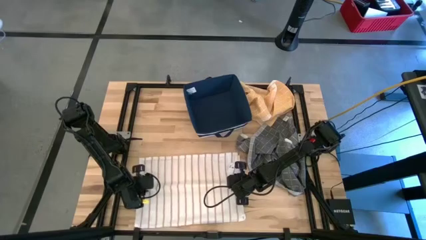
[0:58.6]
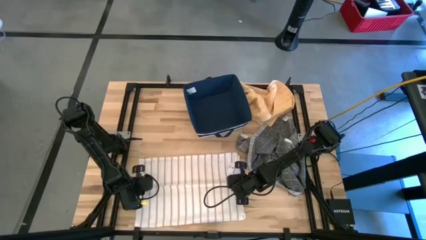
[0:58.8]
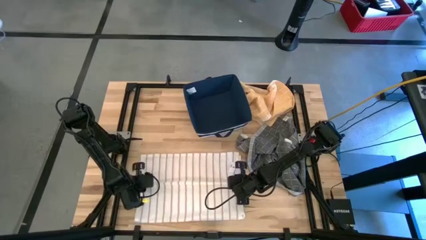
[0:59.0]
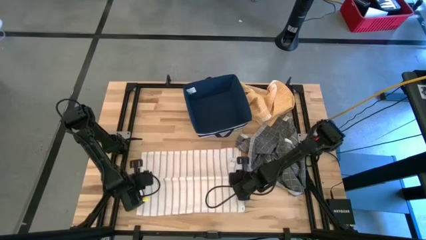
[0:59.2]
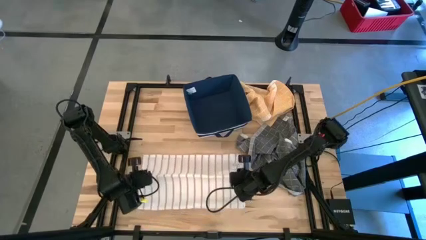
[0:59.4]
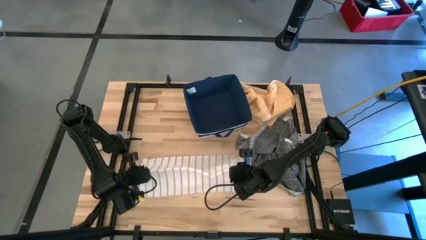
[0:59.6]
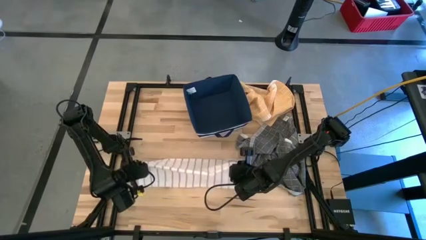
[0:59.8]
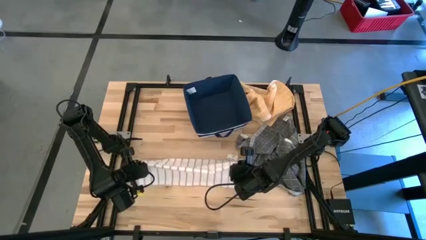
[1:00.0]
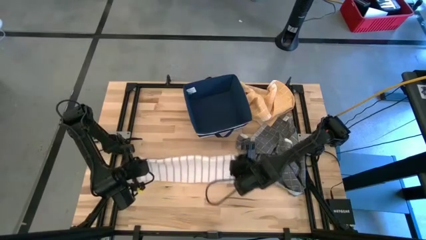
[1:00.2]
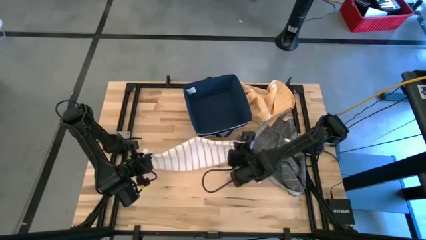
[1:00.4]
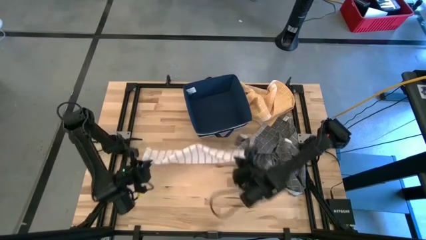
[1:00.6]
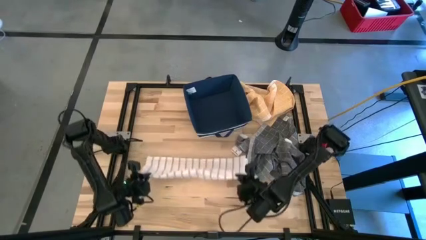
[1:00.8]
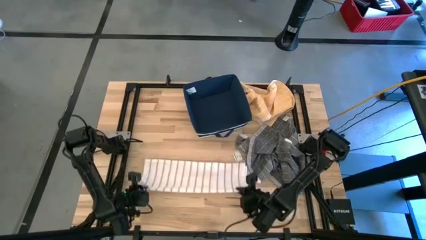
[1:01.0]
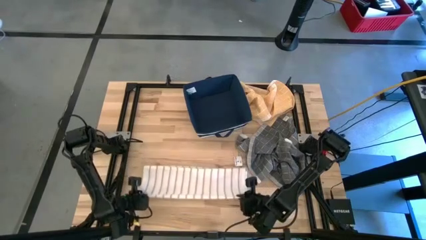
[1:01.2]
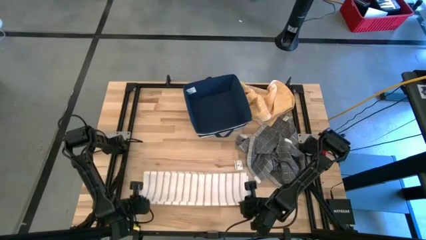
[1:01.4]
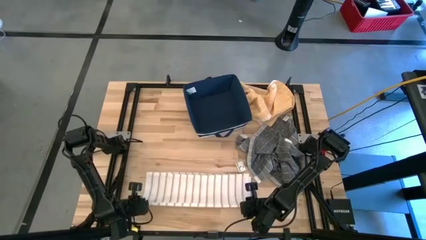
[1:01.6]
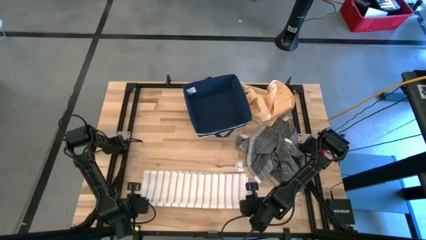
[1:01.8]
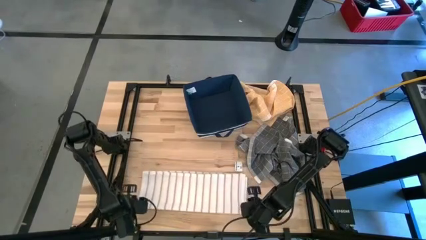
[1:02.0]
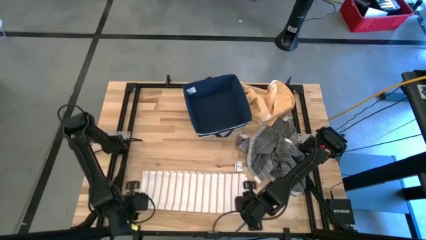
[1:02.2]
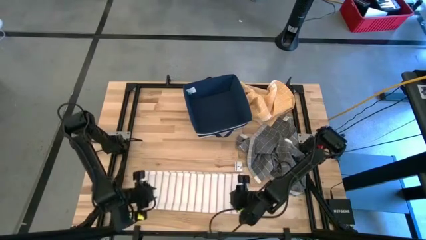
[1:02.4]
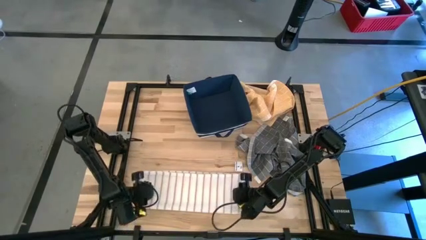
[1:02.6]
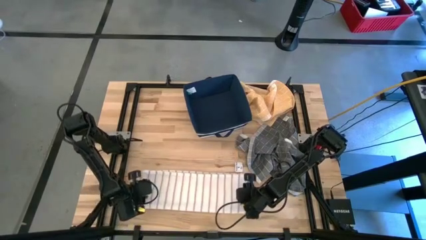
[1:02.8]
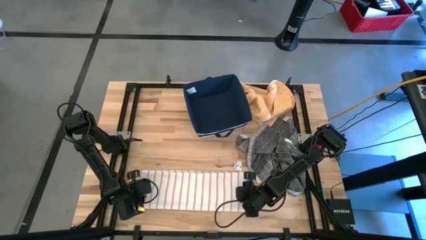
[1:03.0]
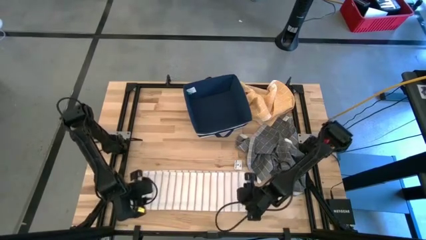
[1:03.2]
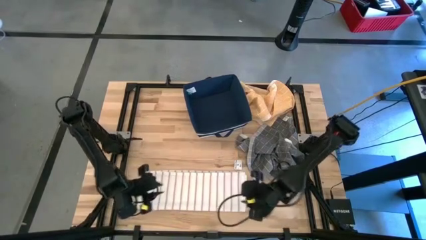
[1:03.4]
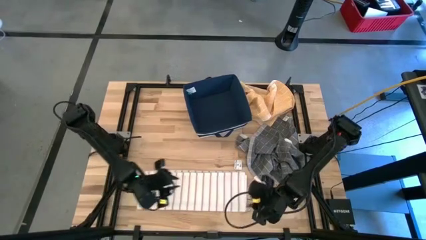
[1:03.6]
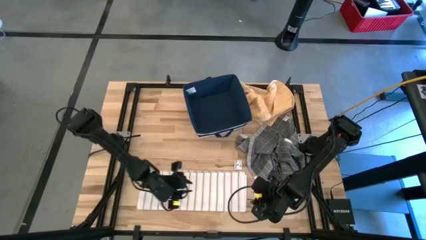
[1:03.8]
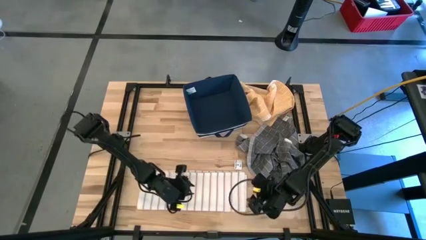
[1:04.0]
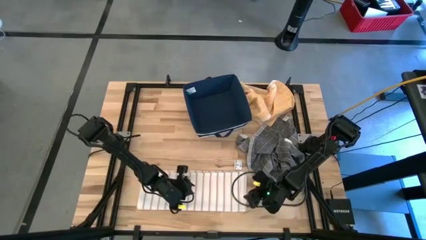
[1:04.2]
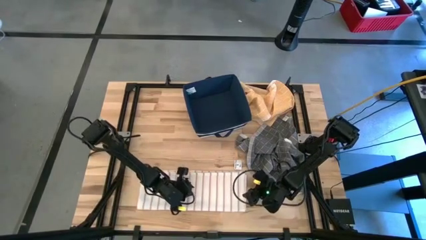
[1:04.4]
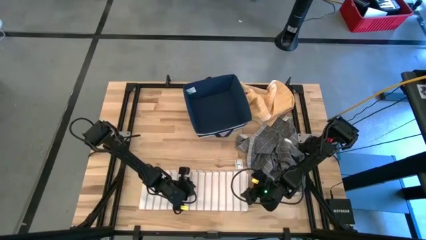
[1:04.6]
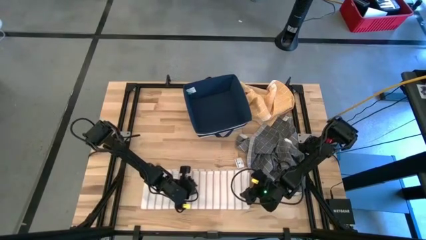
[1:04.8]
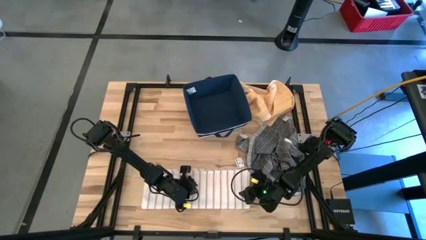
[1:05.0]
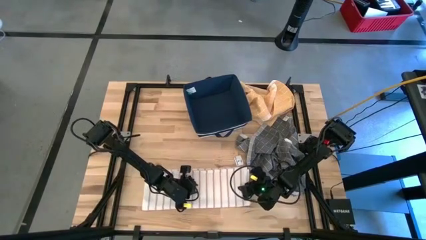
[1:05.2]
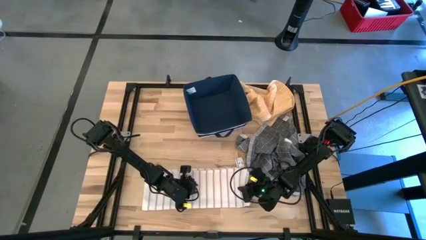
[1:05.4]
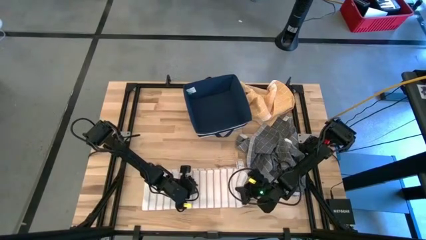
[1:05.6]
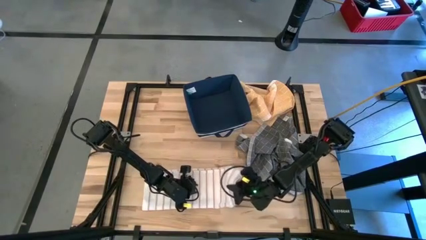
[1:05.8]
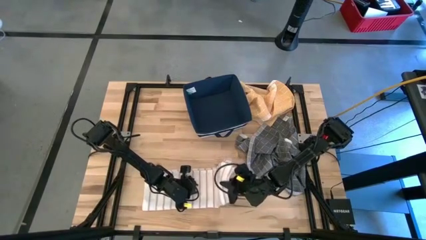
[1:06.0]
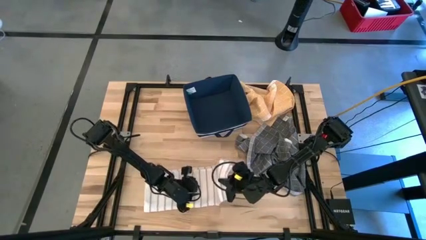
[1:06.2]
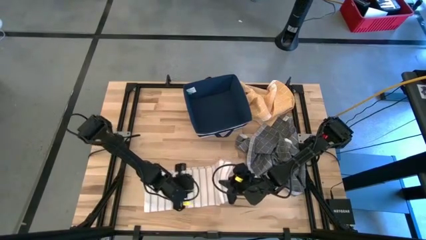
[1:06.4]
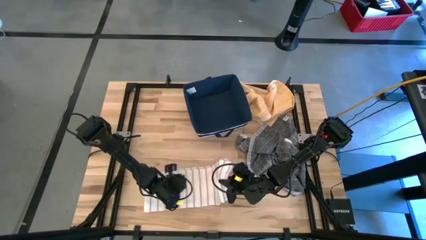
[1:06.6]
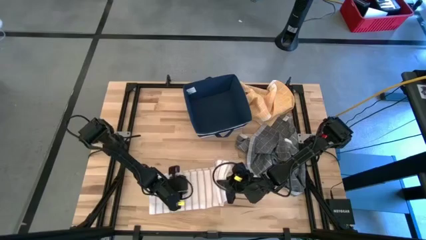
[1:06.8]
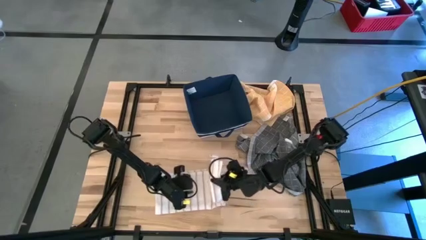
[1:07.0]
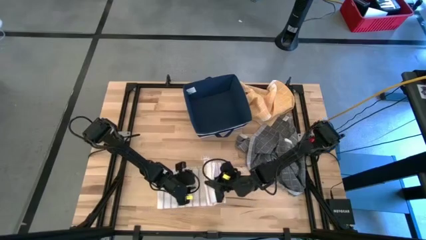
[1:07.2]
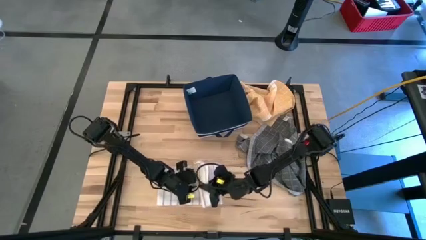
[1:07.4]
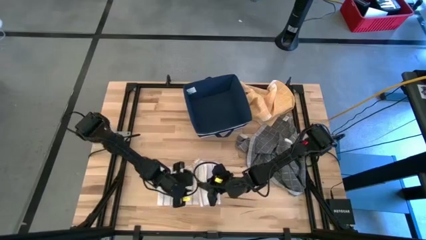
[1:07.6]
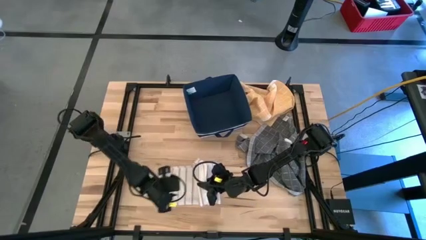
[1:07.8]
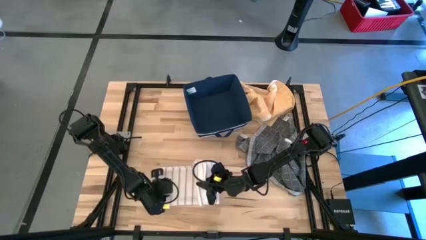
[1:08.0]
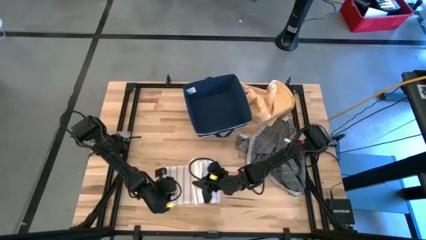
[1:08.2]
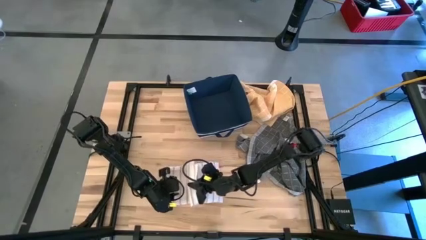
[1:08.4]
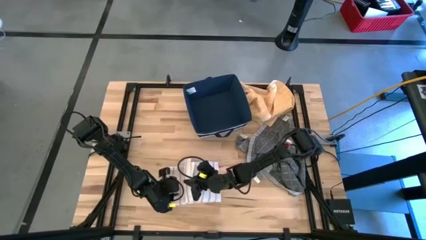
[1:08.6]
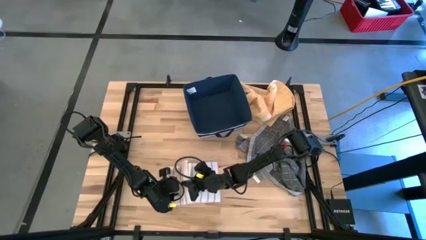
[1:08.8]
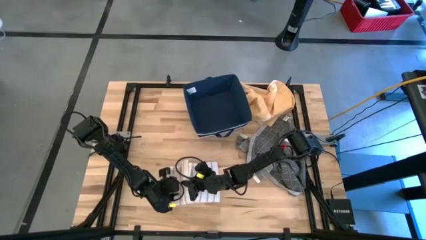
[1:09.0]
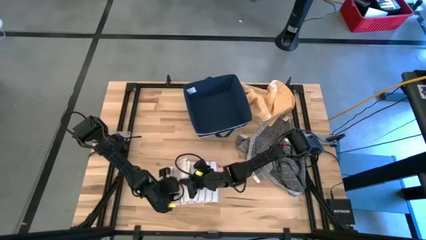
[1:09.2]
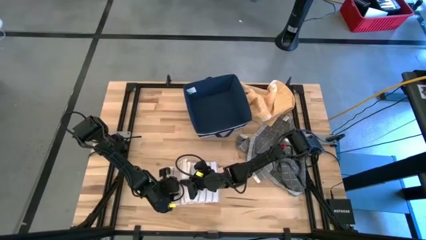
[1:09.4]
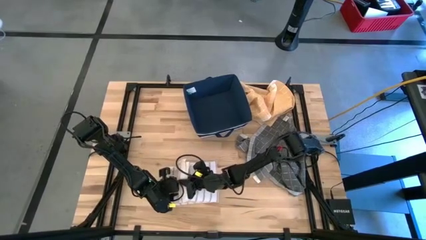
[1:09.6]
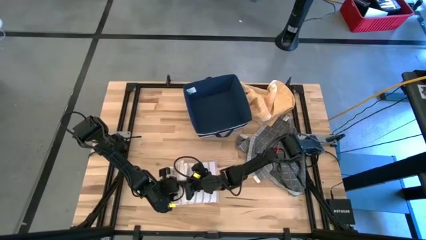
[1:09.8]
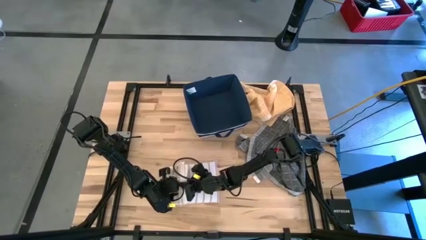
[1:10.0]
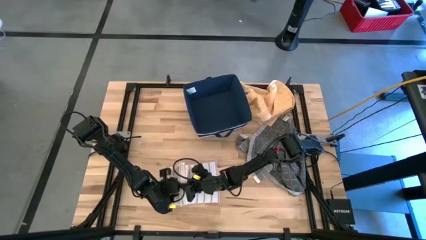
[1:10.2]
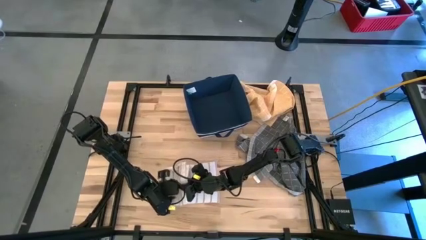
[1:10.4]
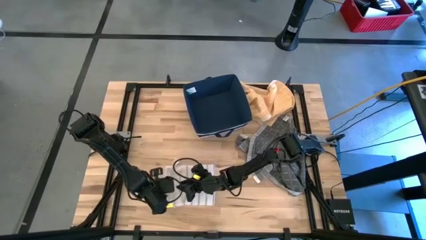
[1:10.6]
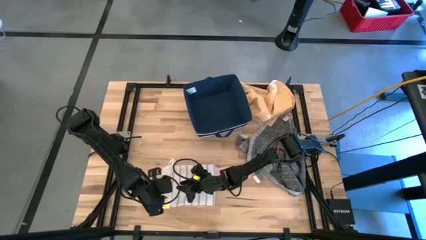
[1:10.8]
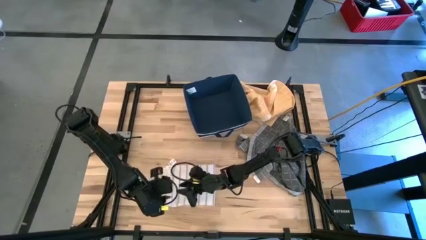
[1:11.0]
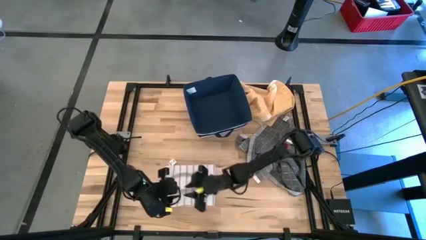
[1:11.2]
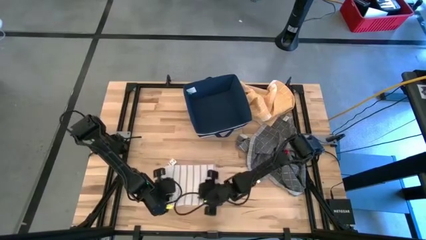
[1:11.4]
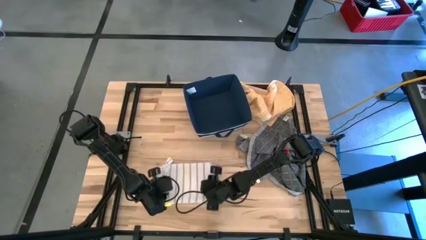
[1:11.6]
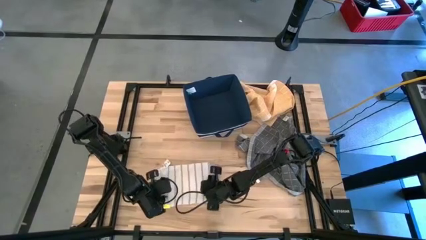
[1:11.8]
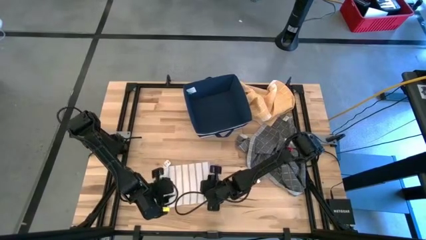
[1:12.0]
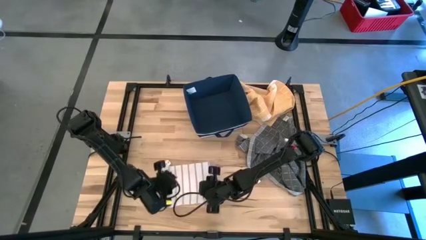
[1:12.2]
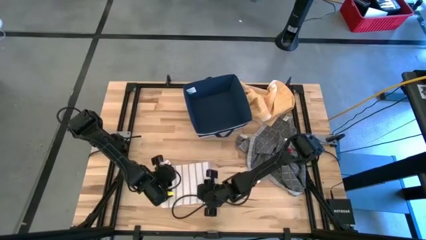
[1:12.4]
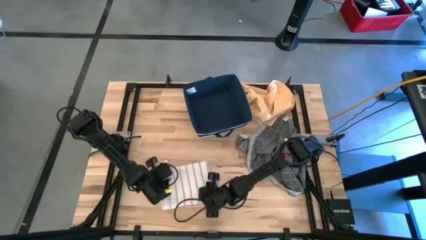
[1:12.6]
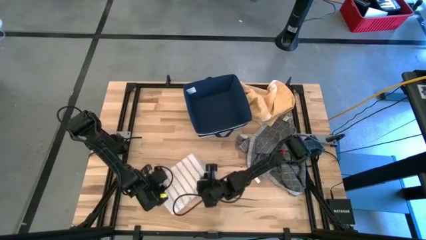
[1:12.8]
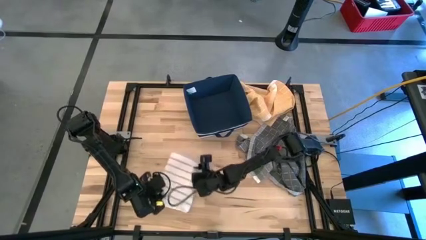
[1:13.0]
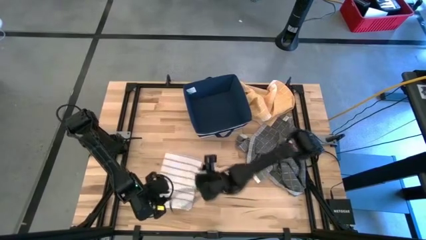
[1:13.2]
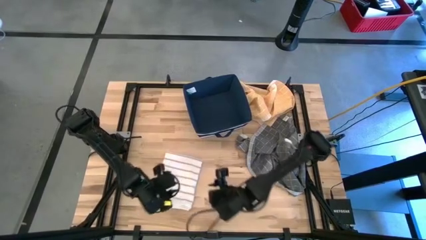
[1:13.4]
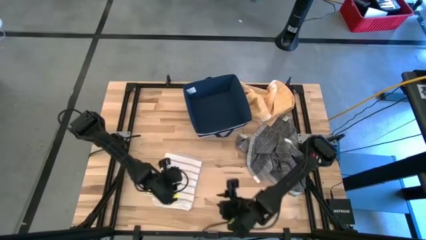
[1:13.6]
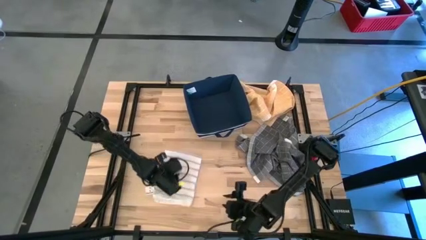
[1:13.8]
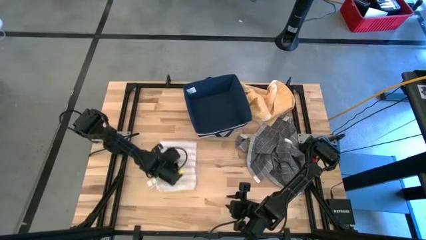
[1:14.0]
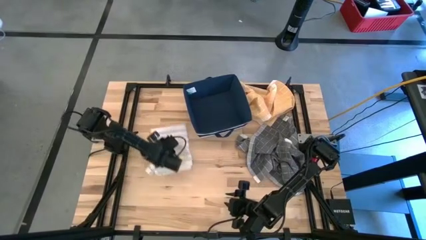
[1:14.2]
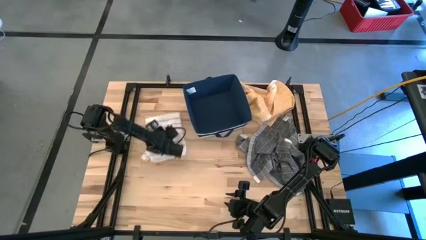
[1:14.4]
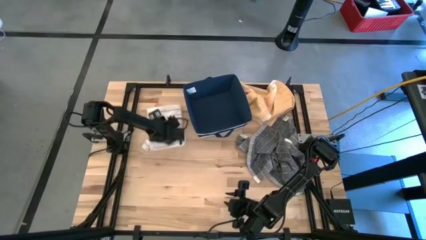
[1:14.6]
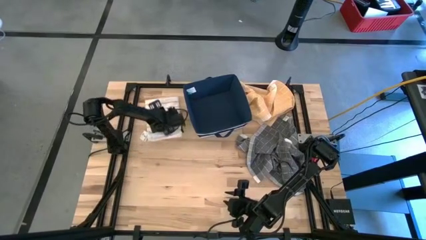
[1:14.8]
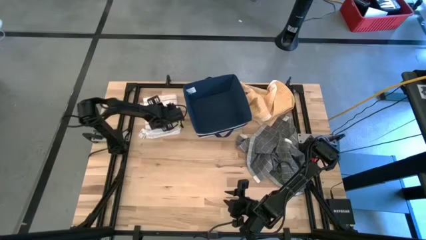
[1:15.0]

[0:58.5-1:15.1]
Task: Fold towel
Fold the white towel
